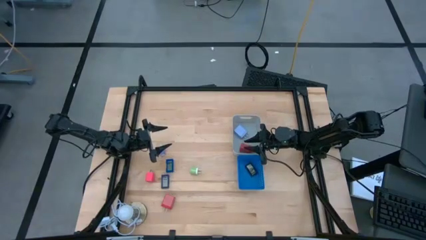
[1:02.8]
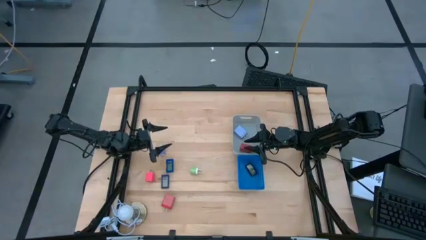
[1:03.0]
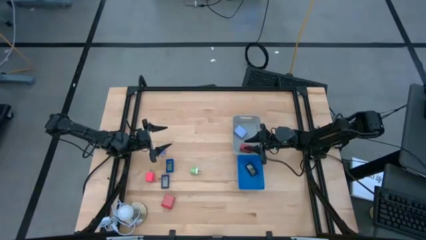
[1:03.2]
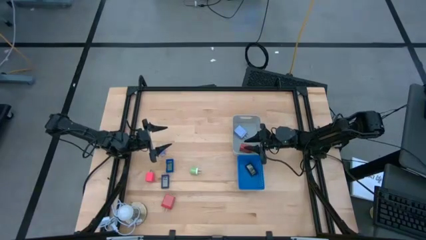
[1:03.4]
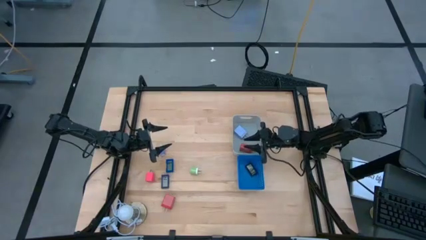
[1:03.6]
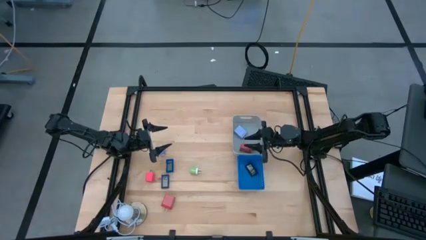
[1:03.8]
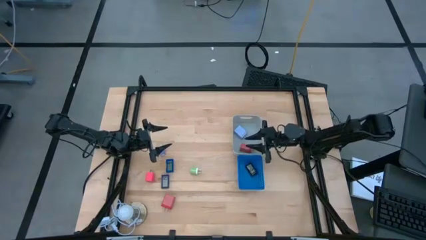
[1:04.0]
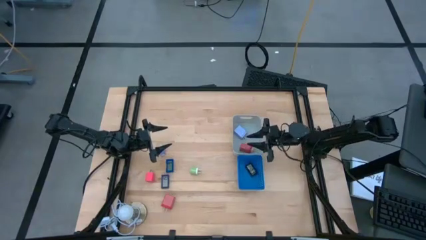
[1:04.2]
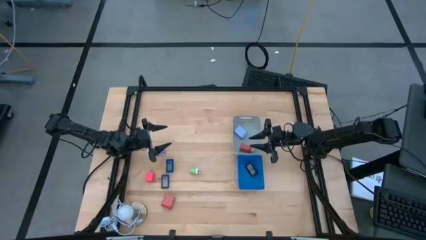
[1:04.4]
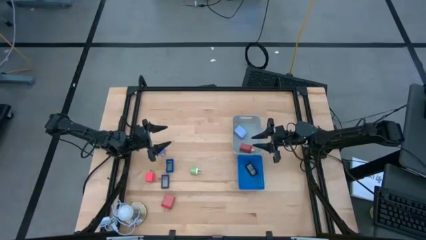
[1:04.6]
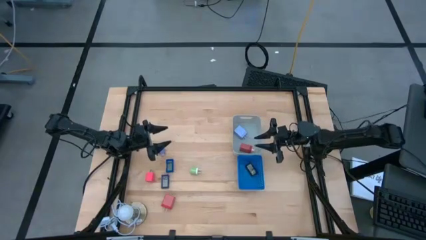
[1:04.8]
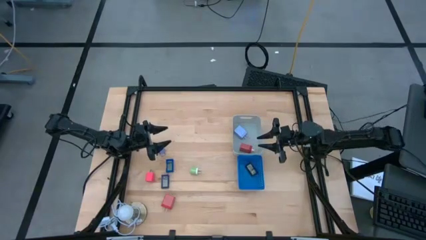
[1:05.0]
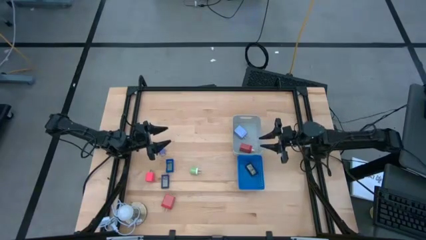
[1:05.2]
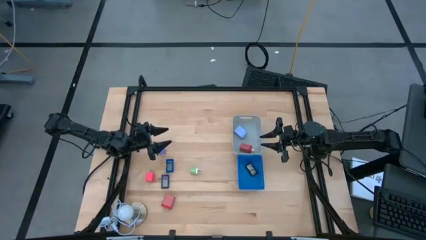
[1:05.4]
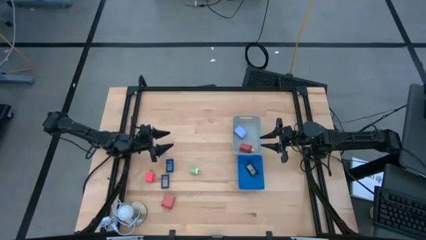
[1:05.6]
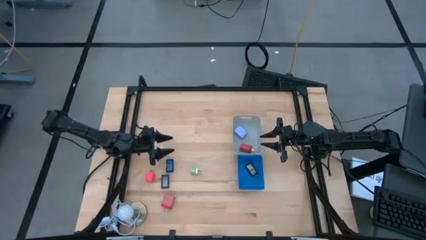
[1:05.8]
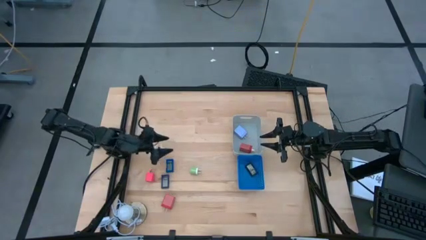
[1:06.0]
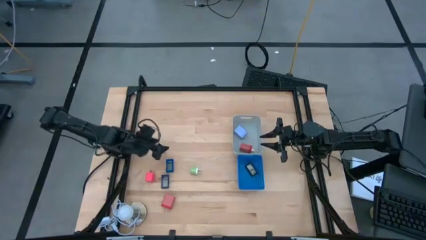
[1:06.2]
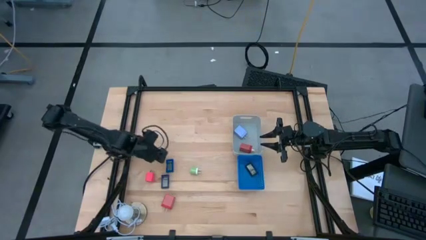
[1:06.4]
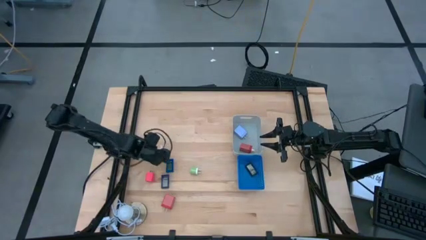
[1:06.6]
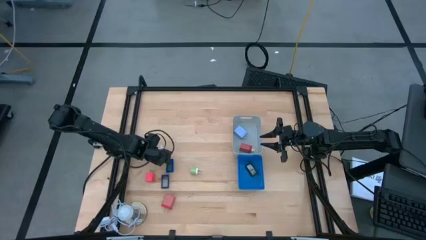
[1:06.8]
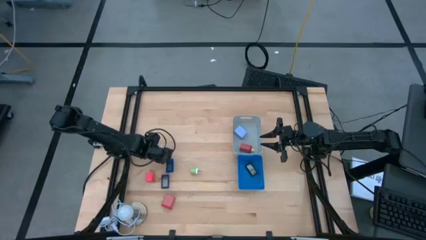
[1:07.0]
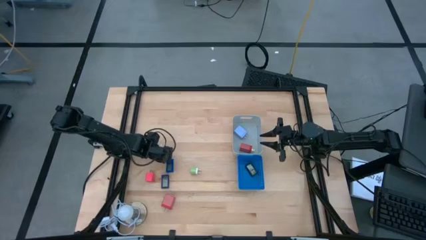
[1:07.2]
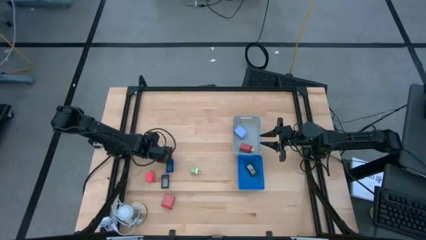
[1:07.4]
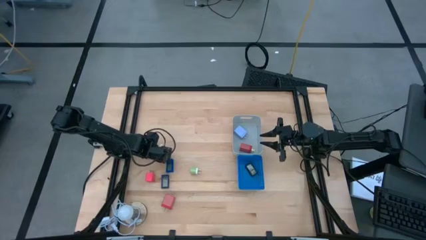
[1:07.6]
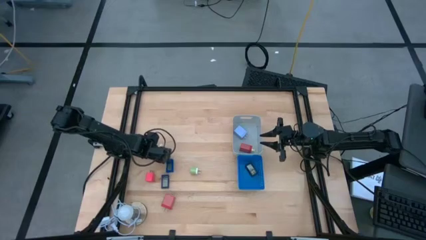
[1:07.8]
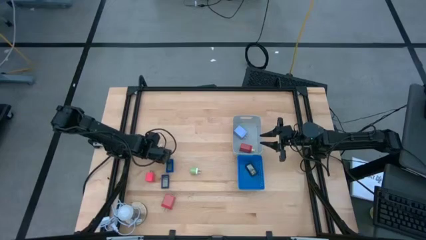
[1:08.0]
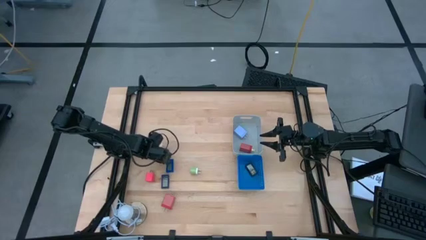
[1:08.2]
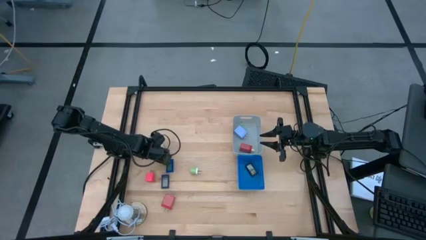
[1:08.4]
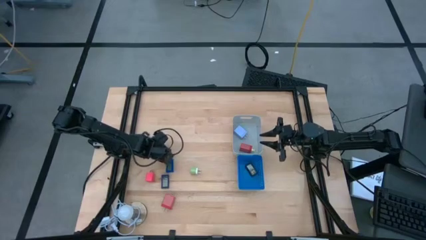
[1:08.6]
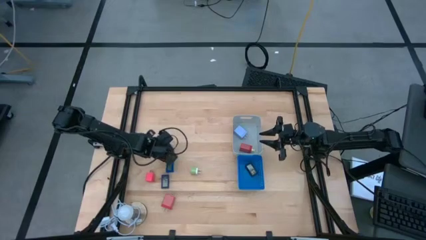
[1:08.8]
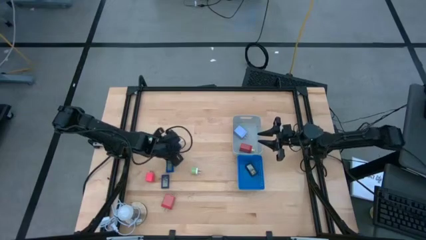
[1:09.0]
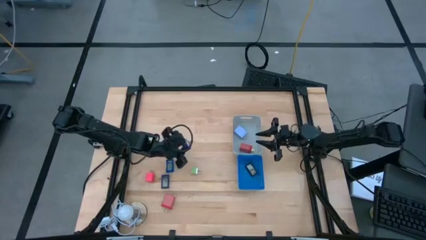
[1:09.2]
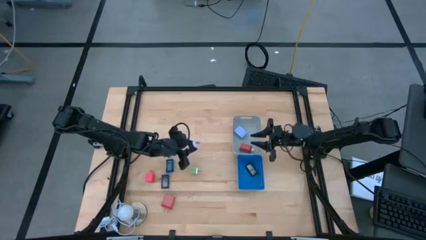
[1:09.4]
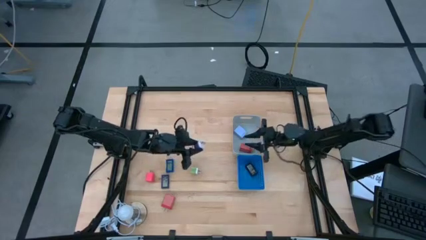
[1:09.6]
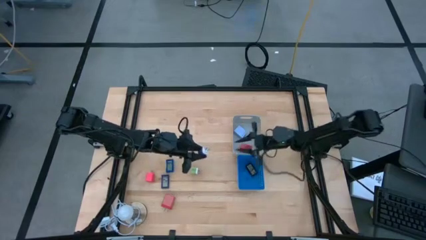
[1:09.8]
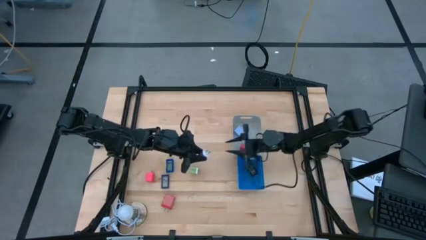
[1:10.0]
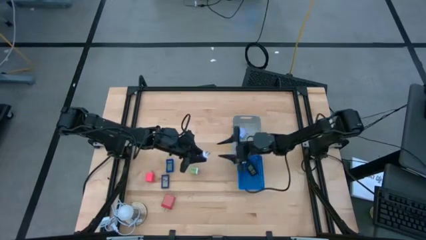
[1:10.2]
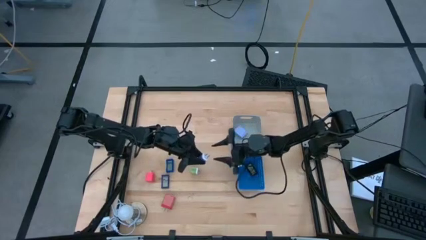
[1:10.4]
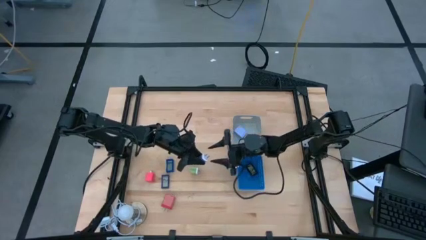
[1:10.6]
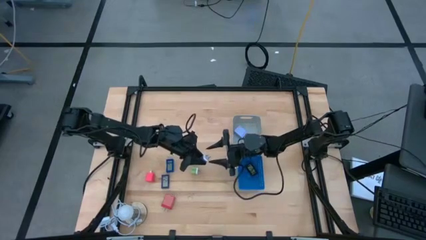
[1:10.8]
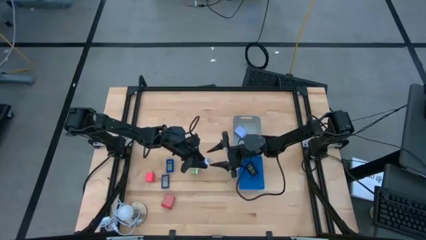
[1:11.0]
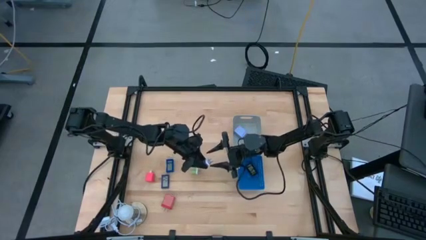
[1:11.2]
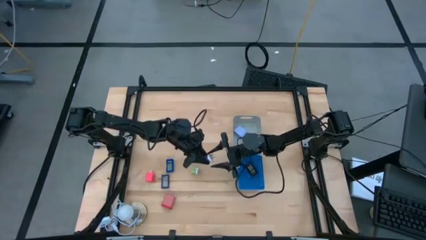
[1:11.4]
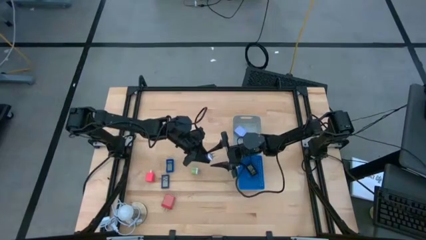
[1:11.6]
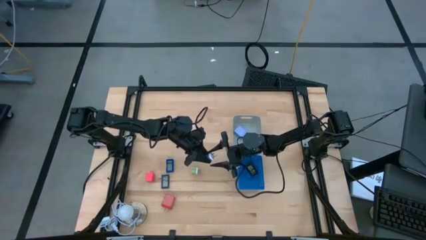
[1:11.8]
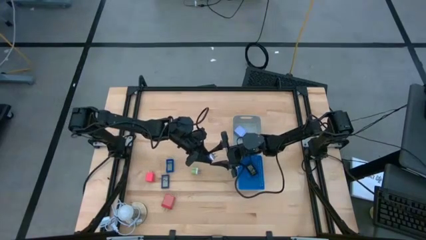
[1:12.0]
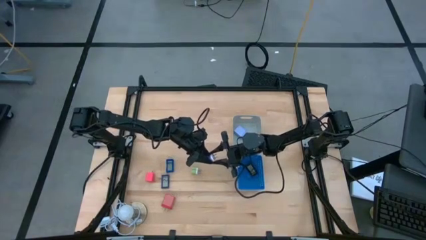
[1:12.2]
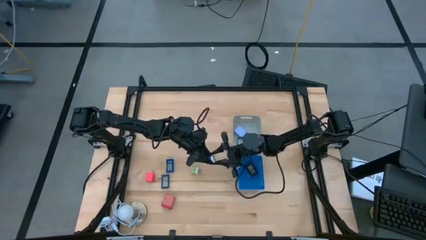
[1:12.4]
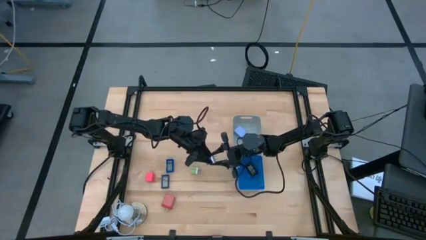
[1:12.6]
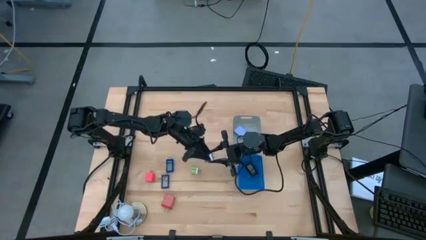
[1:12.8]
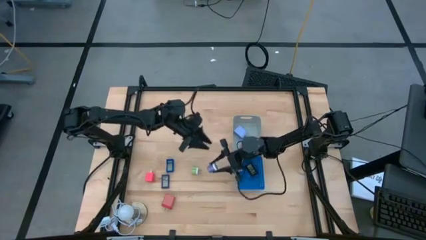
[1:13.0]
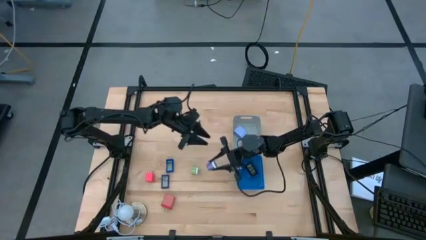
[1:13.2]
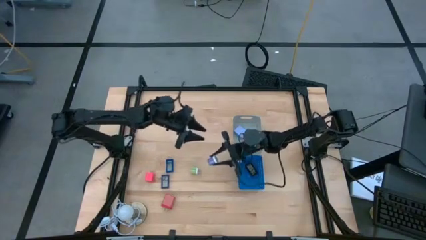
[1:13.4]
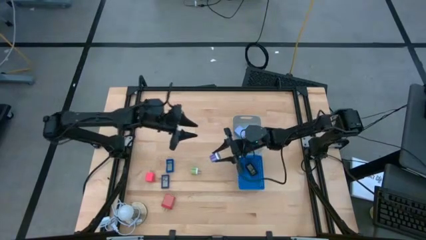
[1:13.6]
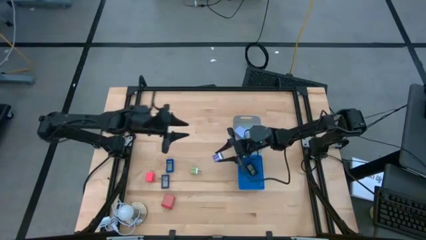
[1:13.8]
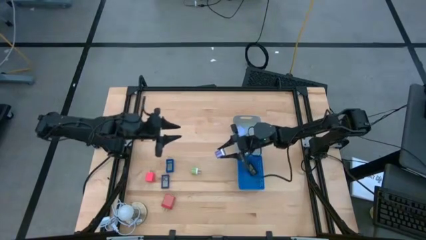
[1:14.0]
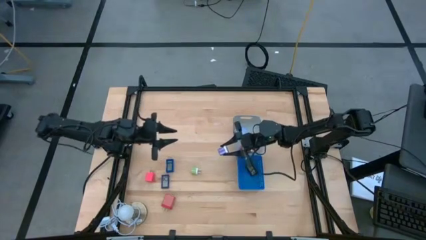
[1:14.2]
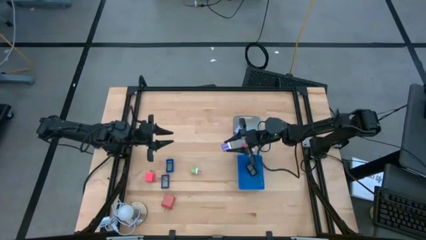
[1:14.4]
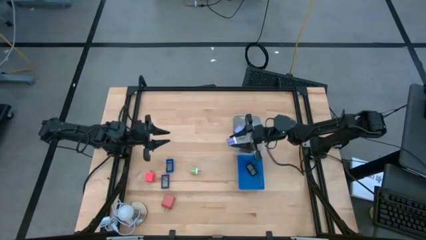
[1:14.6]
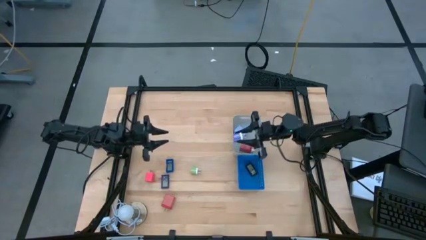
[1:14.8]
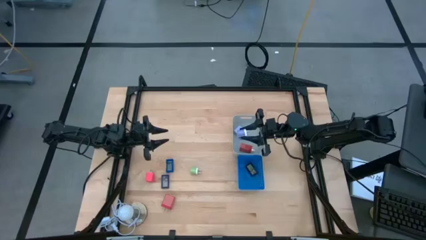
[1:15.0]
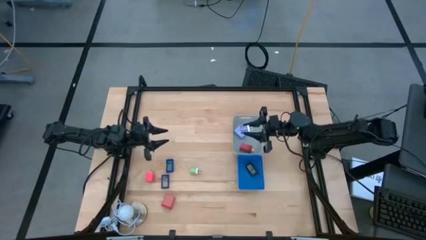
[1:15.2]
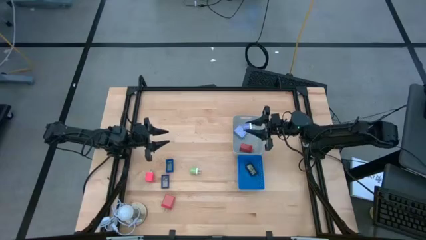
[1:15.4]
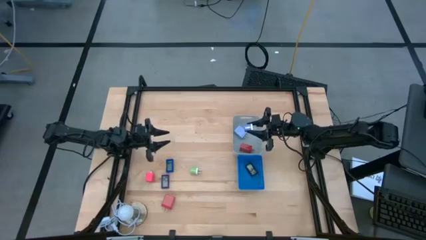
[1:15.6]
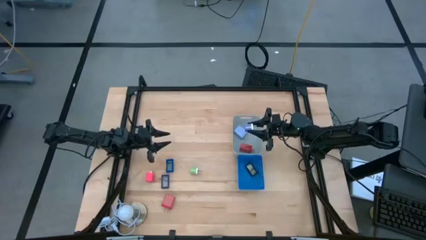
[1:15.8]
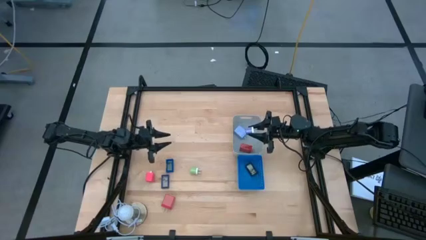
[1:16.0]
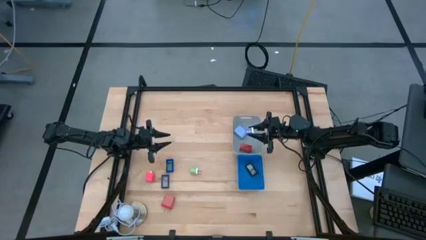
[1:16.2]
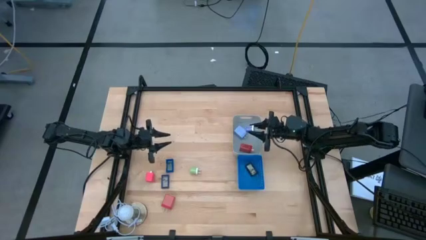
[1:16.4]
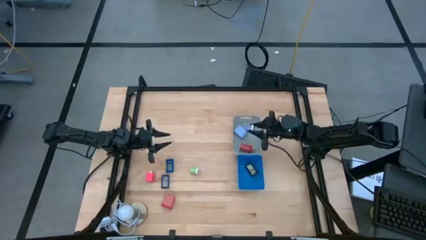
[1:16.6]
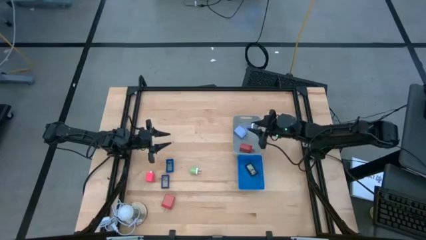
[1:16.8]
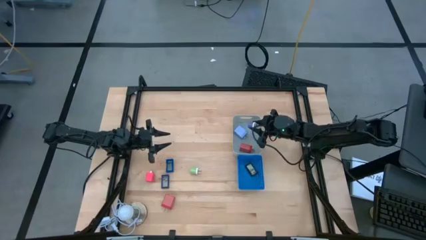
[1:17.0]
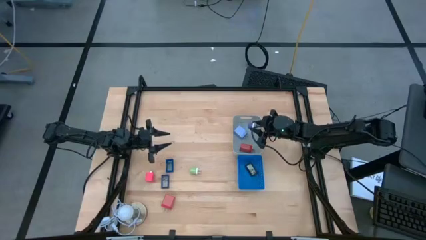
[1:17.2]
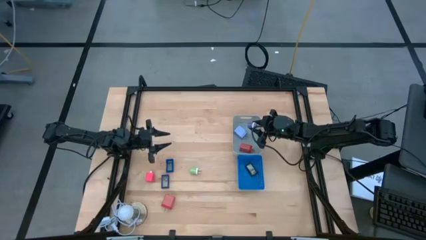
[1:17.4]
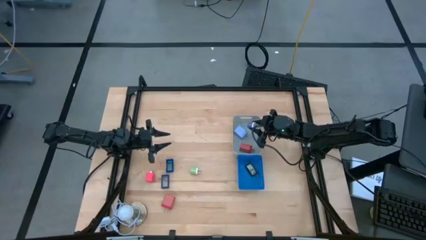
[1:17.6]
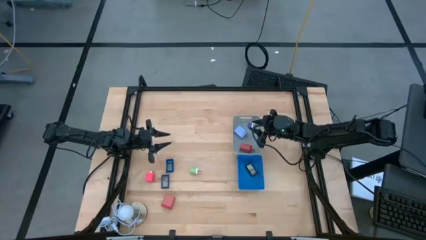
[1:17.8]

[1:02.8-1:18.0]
Task: Pick & Place Office items
Put the purple charger adapter into the gray bin

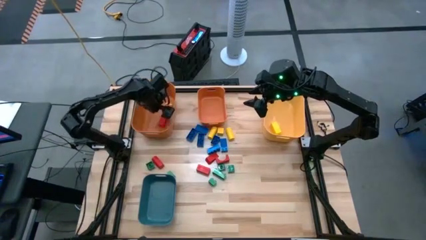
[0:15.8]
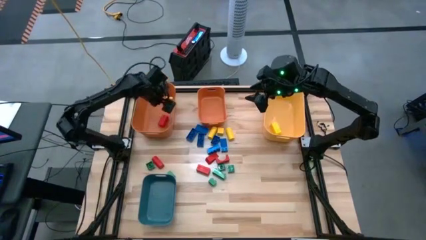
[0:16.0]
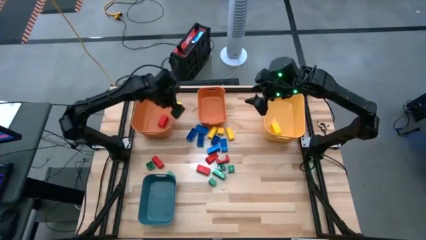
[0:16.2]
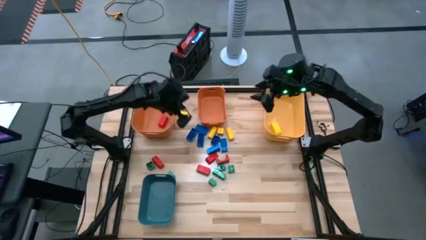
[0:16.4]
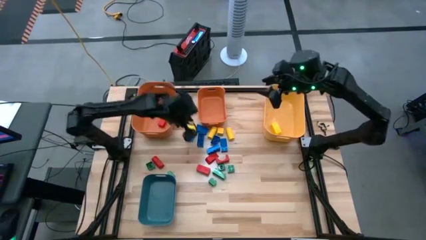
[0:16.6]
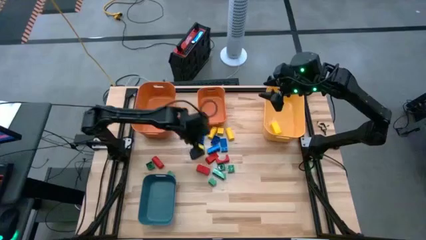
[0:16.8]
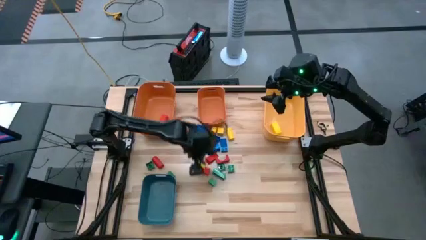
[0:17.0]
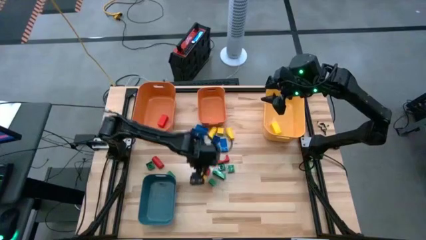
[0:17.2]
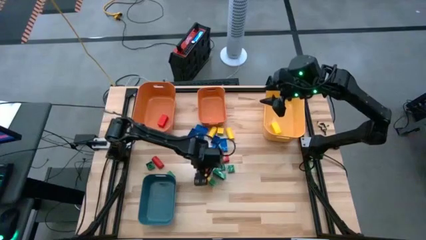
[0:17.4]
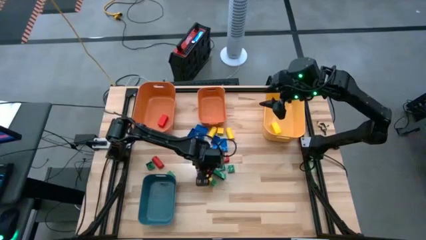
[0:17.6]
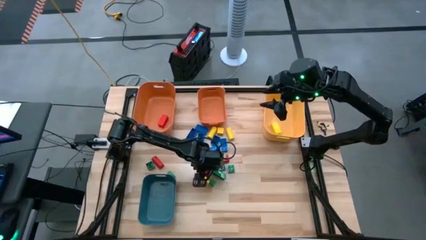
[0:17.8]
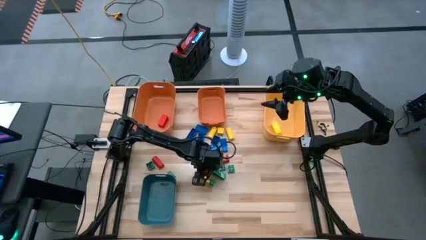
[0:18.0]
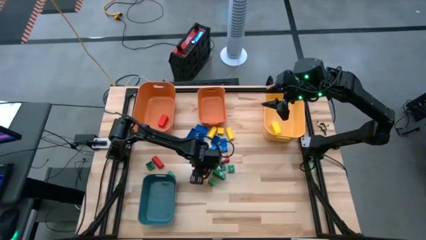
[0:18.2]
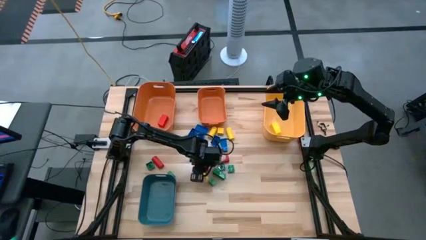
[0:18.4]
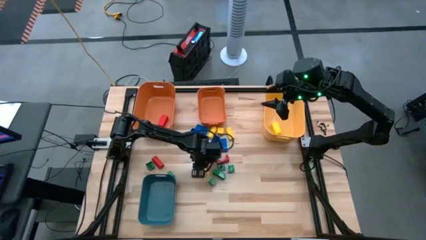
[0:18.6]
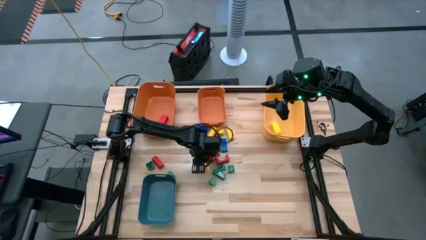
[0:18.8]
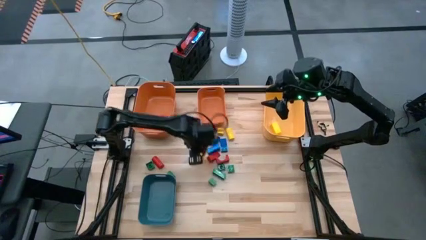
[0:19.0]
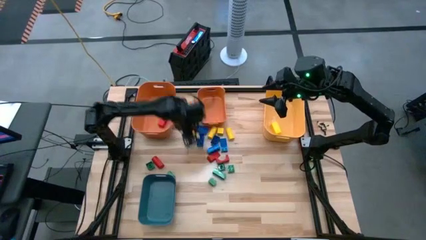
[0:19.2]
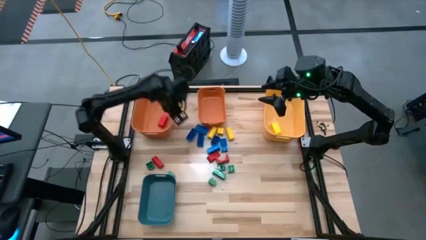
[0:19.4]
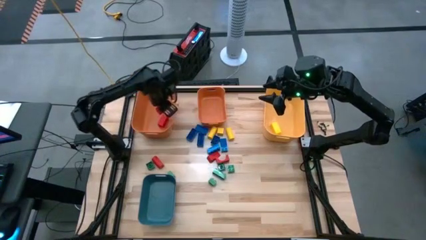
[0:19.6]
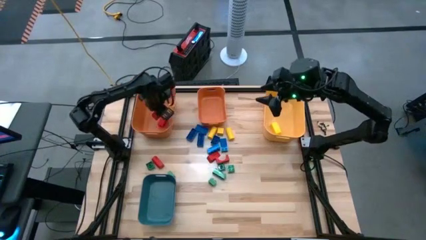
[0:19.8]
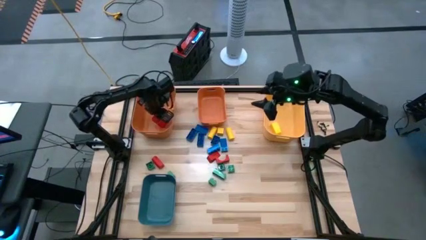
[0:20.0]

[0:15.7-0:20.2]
Task: Sort blocks
Put the red block into the left orange bin
